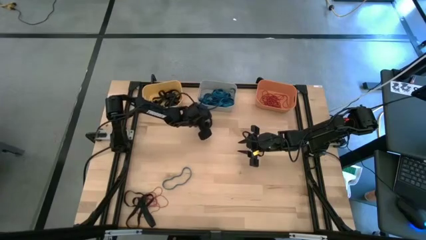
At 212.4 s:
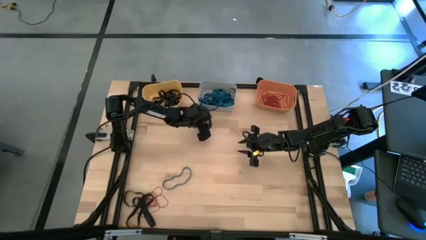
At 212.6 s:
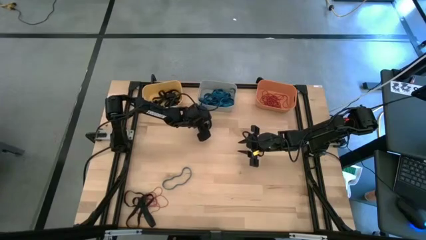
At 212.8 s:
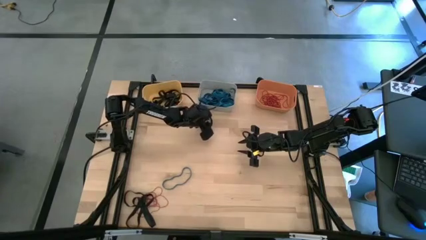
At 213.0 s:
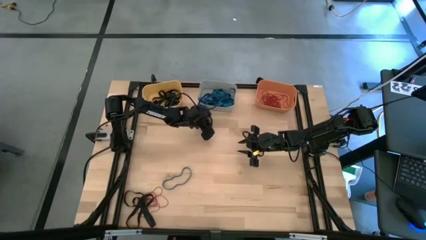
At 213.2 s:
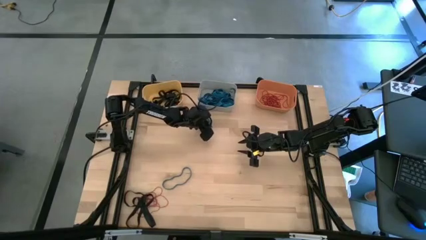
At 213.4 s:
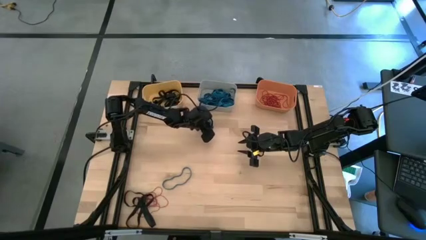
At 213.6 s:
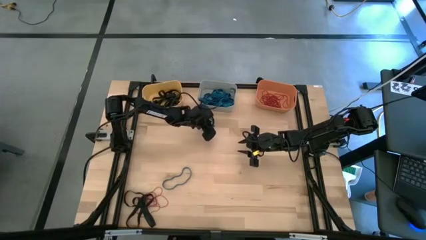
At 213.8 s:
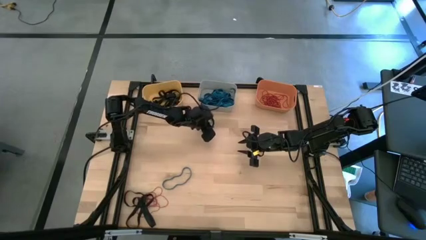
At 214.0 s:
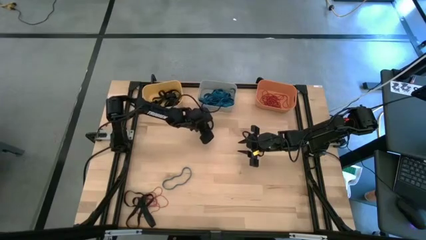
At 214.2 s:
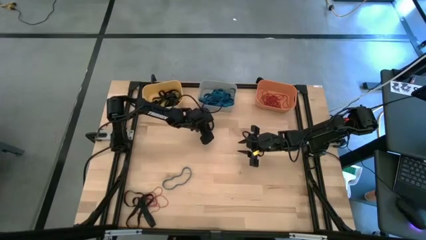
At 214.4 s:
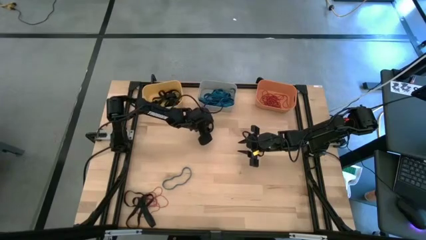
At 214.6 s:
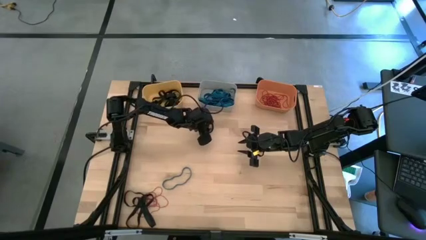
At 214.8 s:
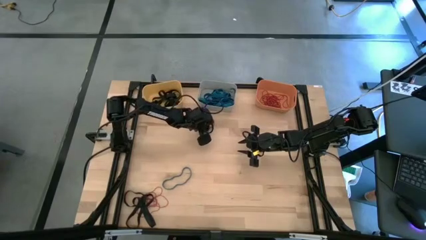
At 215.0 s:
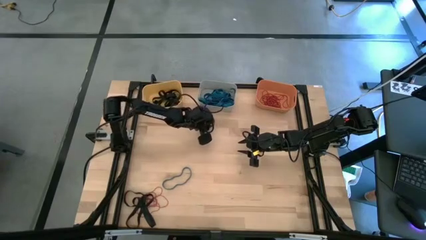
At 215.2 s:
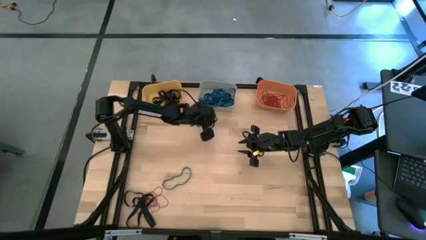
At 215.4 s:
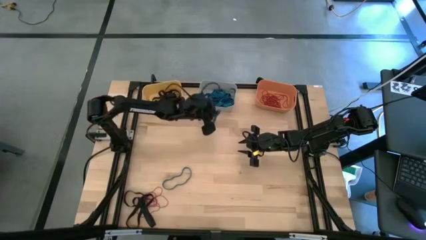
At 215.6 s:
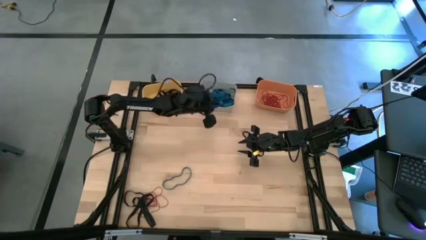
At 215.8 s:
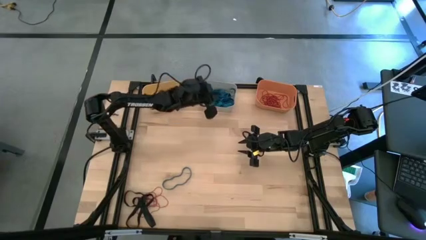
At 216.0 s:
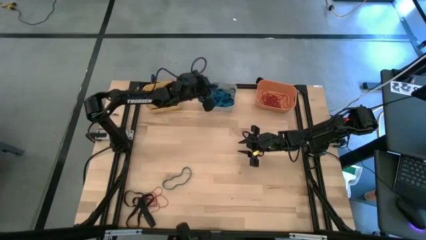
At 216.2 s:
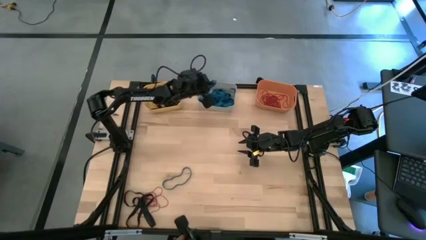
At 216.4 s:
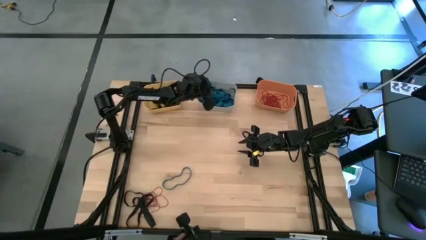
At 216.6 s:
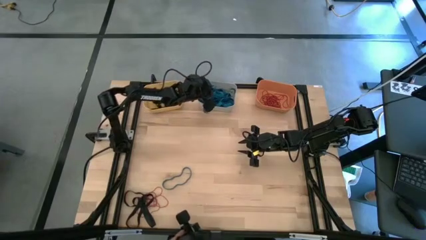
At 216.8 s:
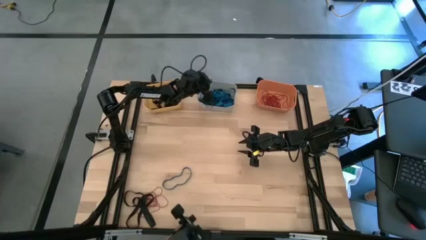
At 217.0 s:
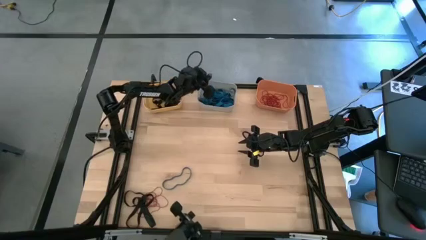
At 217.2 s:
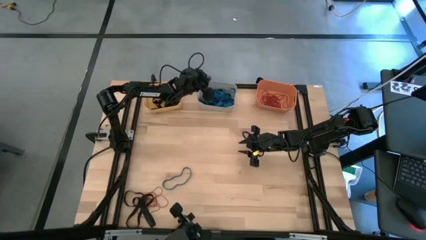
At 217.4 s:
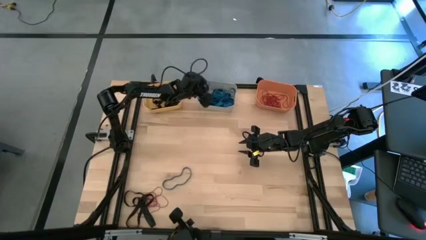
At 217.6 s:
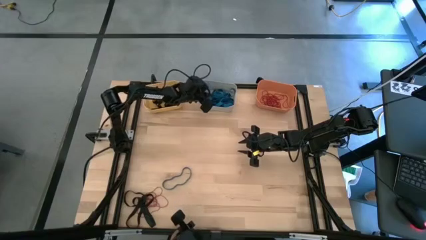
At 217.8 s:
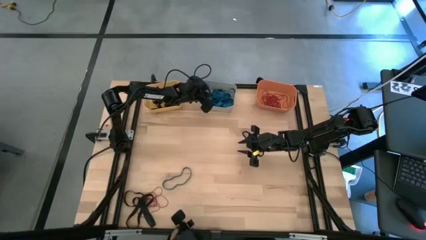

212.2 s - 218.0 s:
Task: Sort rubber bands into baskets
Put the blue rubber band into the grey bin

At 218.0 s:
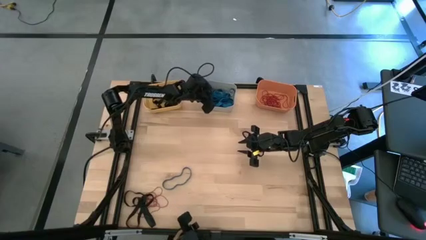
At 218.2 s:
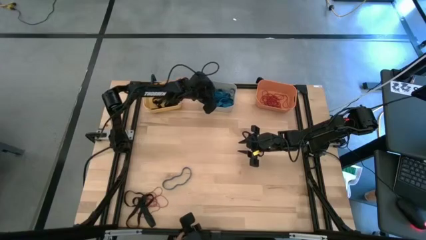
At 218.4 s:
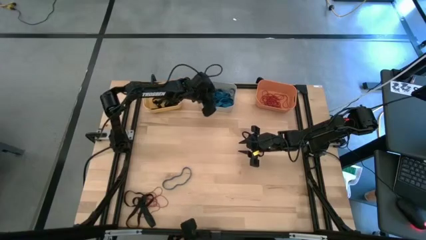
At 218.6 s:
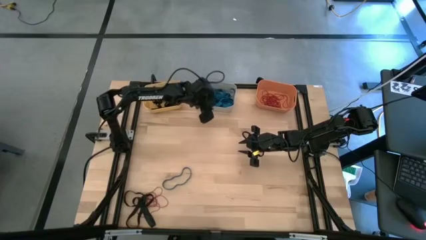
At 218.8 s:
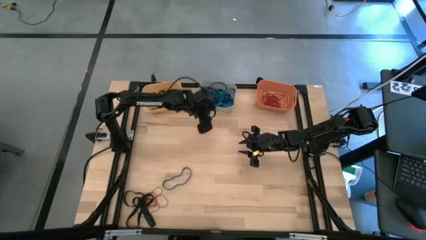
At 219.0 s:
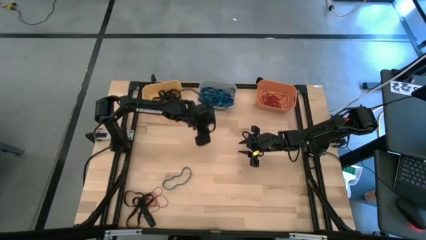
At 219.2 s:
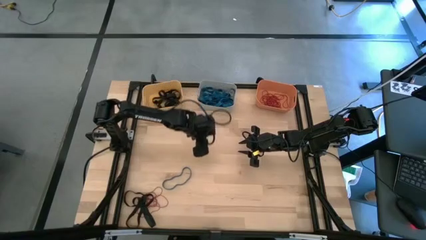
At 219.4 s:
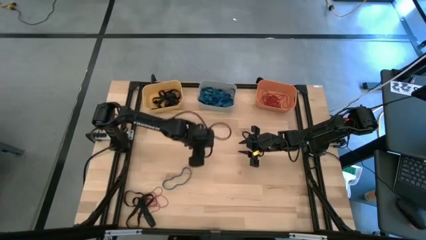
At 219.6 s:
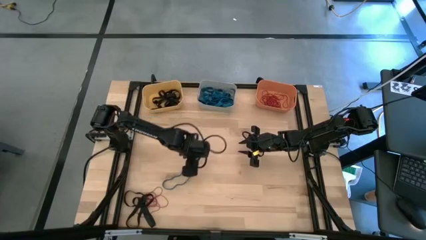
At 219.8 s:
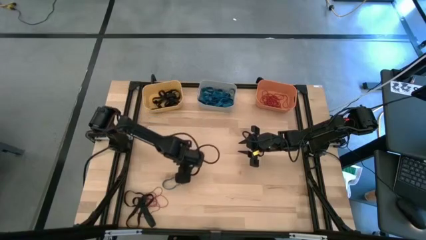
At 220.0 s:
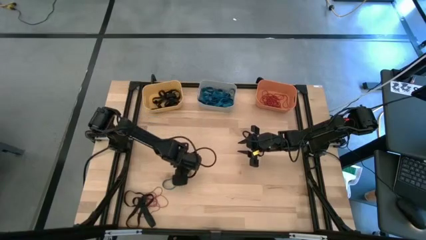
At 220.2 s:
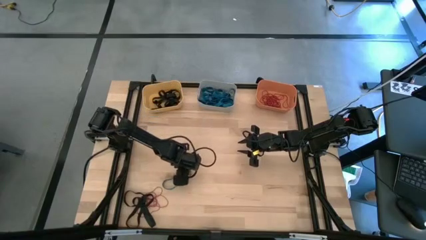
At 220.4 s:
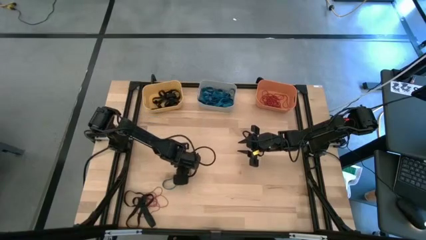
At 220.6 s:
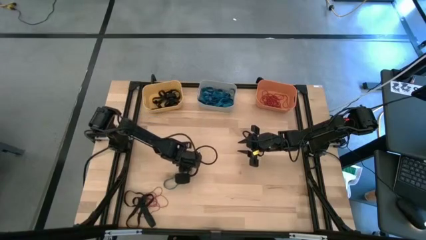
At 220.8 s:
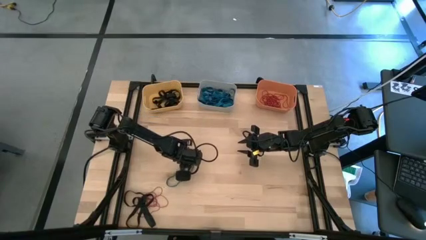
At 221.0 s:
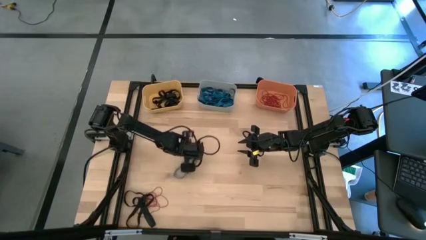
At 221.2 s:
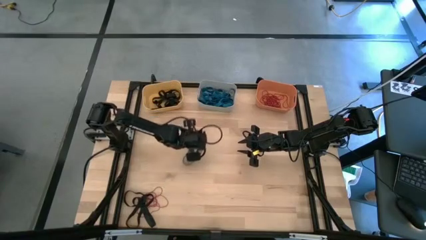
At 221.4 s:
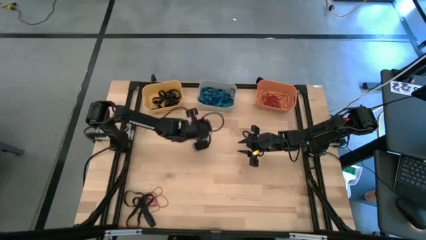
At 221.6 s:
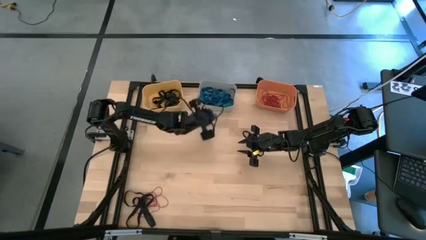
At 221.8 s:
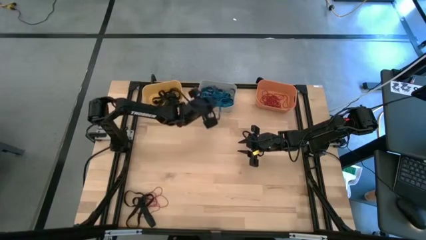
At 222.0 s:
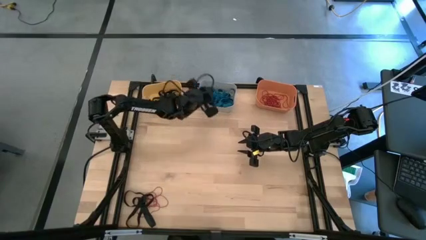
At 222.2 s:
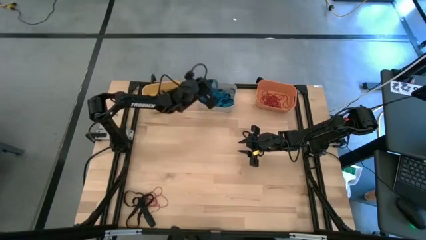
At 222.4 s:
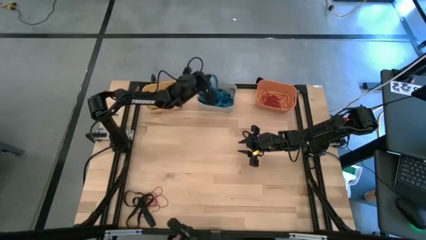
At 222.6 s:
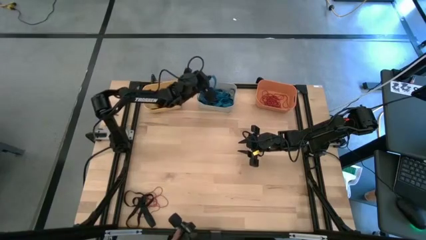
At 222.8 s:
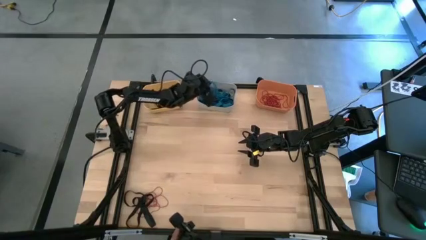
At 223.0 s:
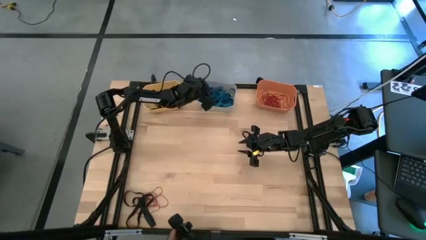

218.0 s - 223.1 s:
Put the blue rubber band into the grey bin

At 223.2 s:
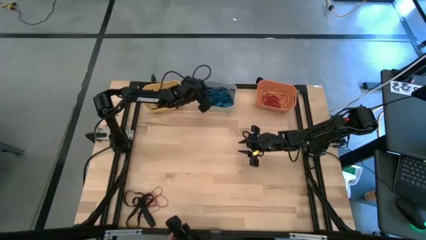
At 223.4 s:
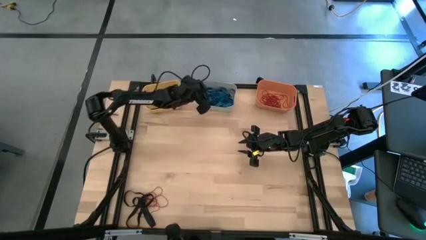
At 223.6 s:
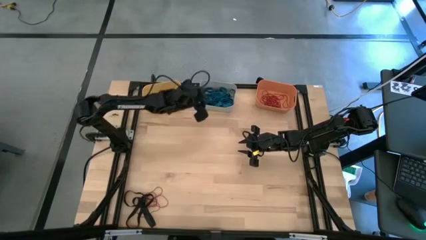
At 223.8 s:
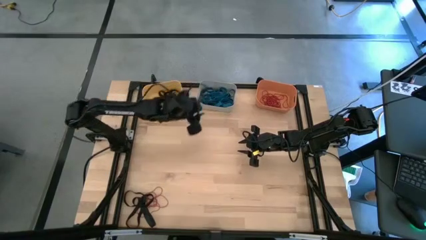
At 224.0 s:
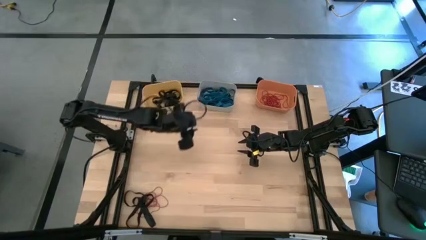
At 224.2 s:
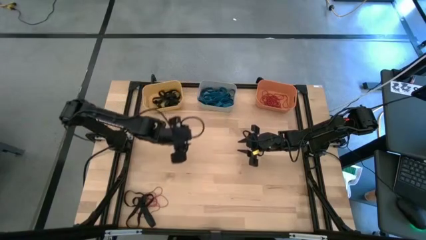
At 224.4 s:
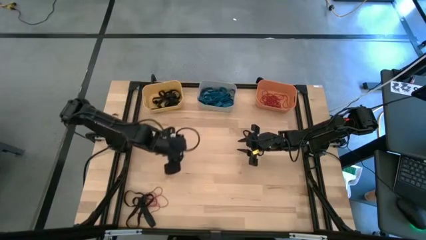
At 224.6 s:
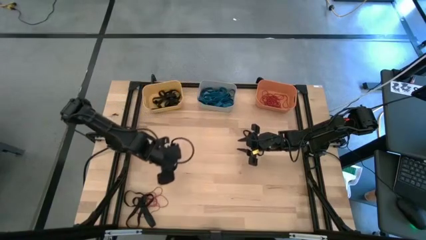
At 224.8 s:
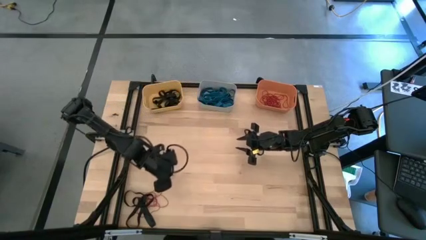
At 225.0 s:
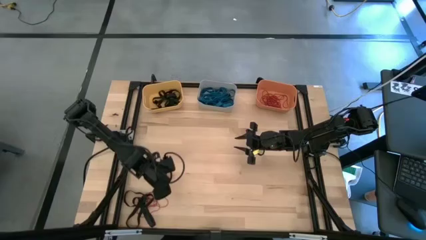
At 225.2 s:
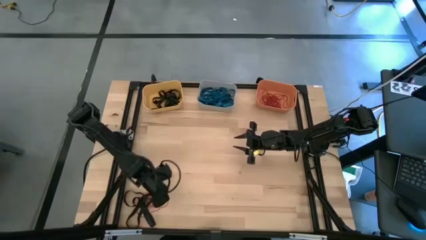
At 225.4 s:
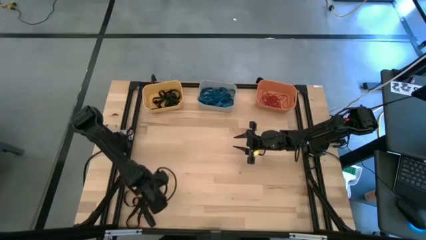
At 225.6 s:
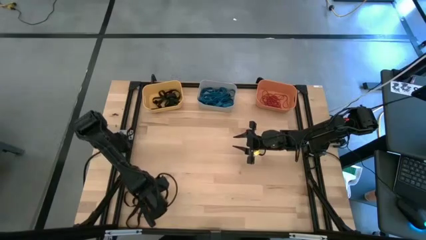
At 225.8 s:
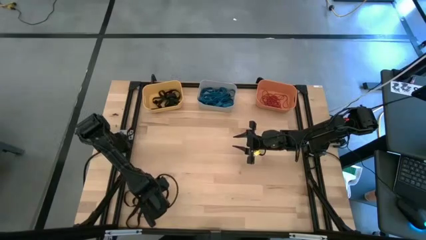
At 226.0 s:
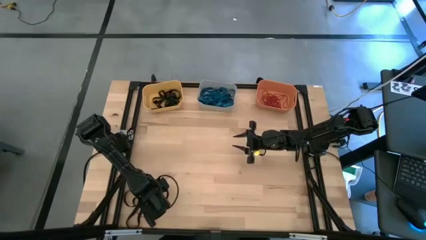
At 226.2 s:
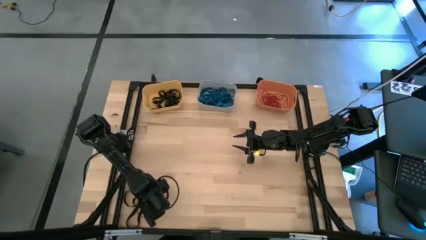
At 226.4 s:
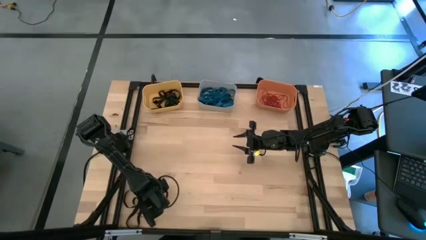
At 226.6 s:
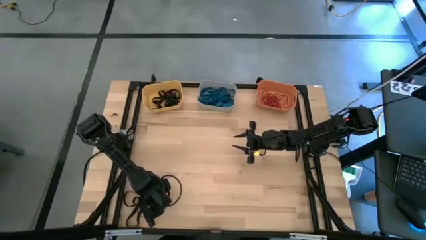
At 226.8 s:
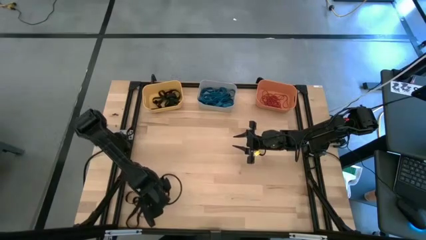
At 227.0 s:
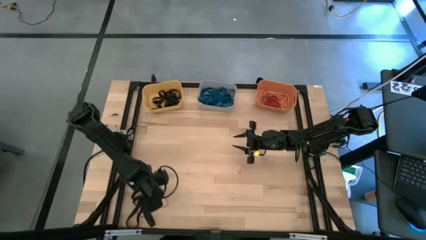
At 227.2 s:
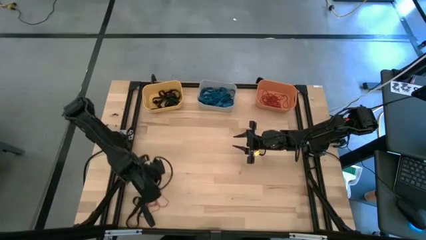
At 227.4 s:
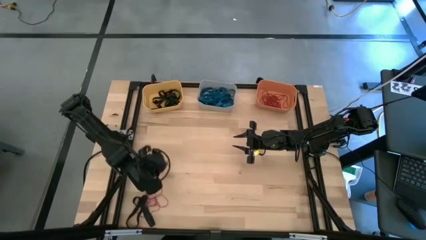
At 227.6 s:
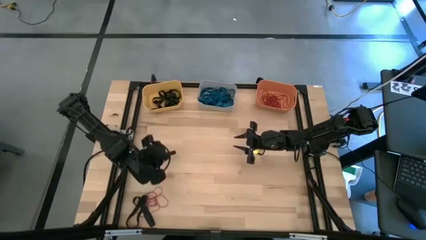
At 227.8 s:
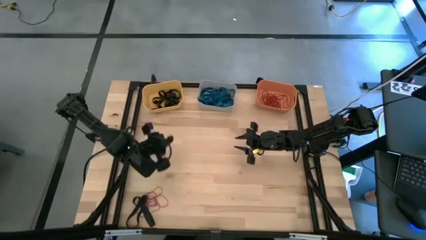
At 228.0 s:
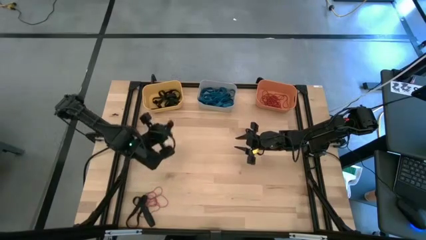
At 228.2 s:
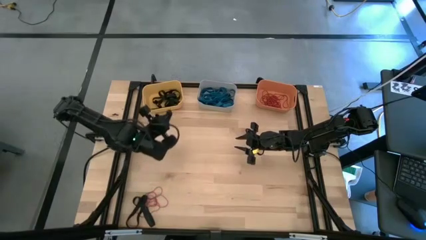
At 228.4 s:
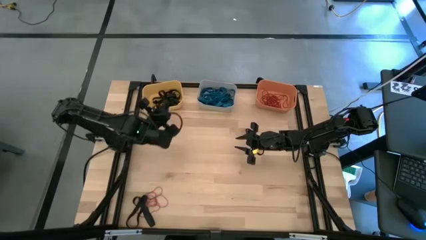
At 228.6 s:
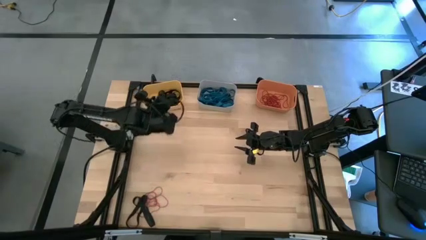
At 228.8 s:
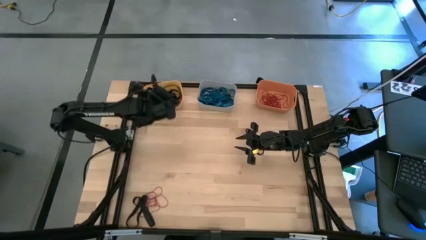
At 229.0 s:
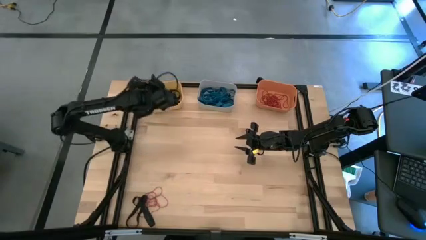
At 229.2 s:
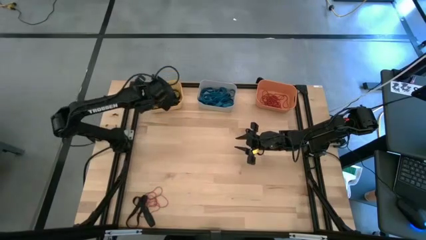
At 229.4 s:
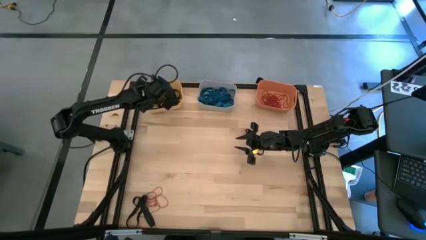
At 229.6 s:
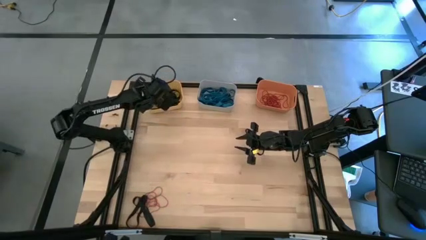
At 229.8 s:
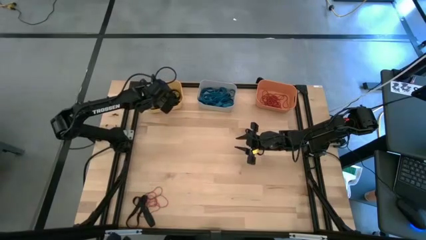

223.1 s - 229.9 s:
Put the black rubber band into the yellow bin
